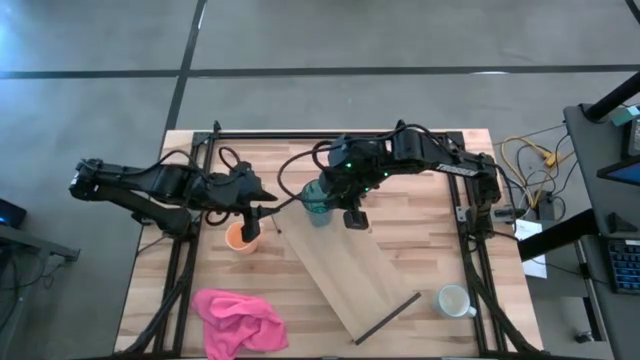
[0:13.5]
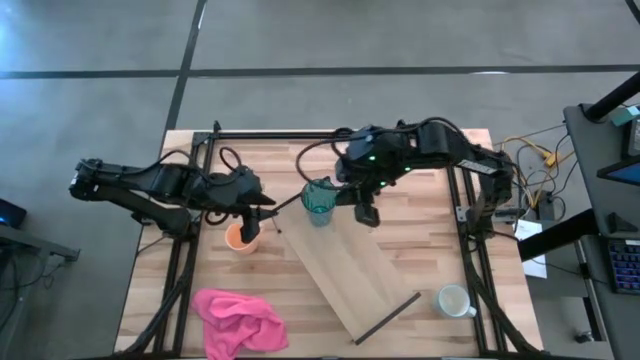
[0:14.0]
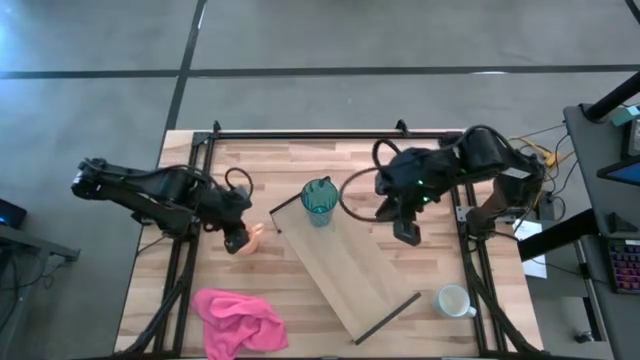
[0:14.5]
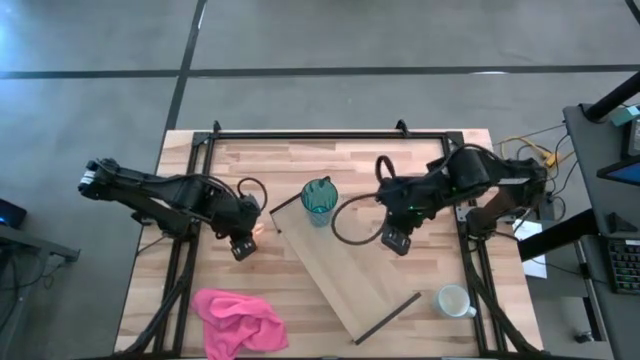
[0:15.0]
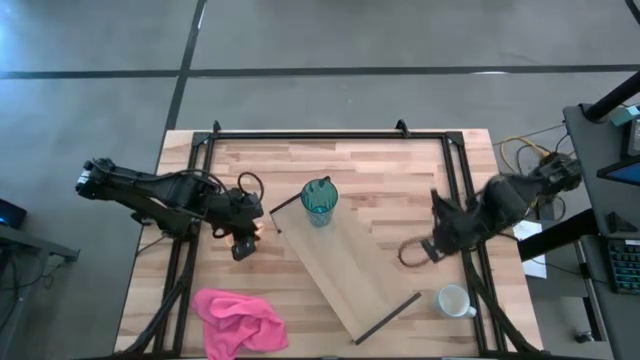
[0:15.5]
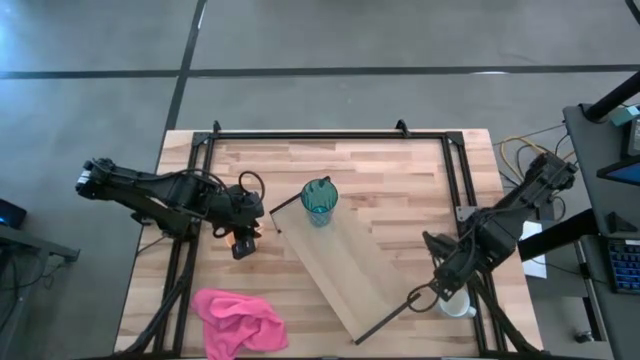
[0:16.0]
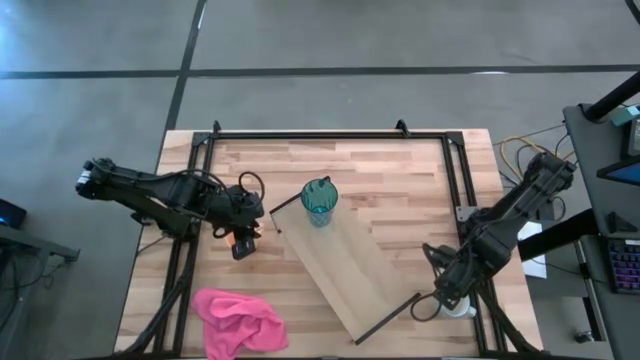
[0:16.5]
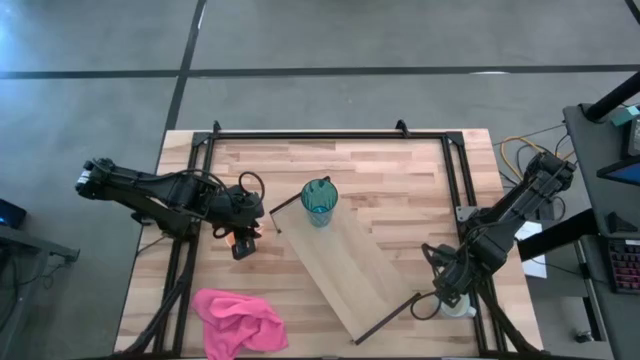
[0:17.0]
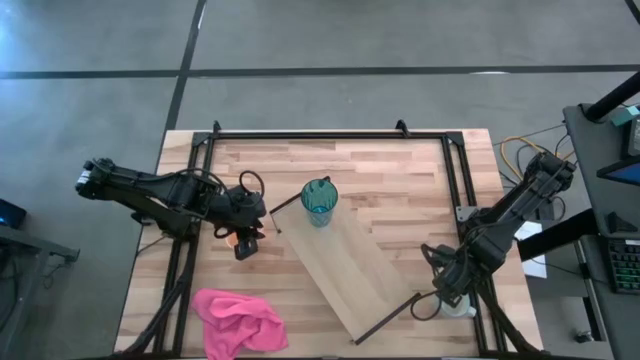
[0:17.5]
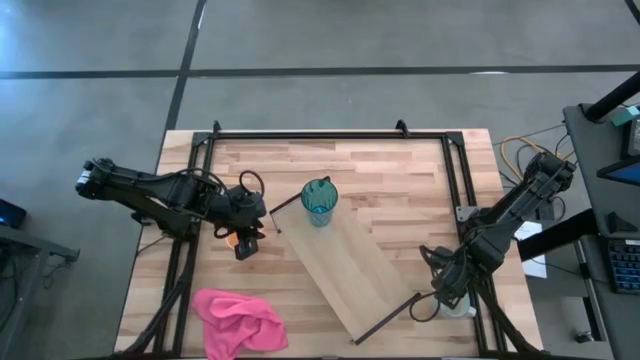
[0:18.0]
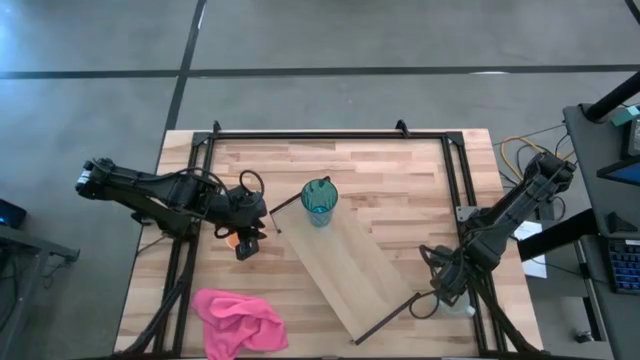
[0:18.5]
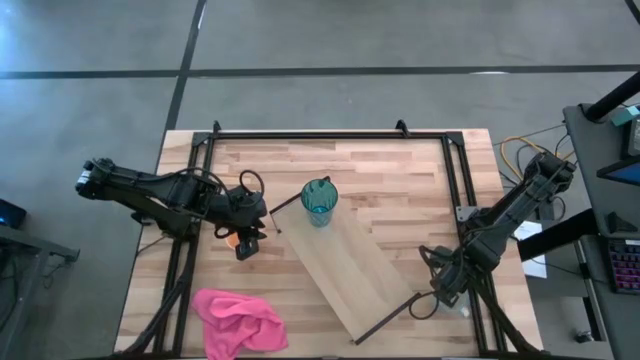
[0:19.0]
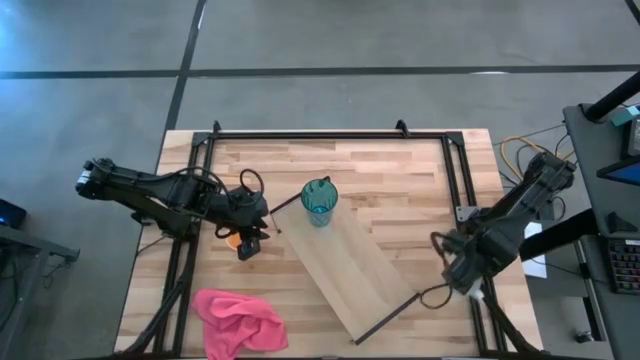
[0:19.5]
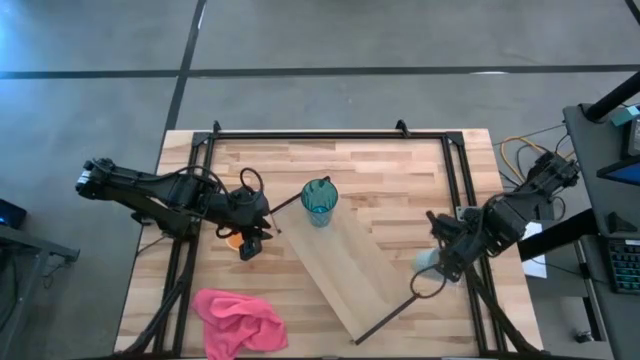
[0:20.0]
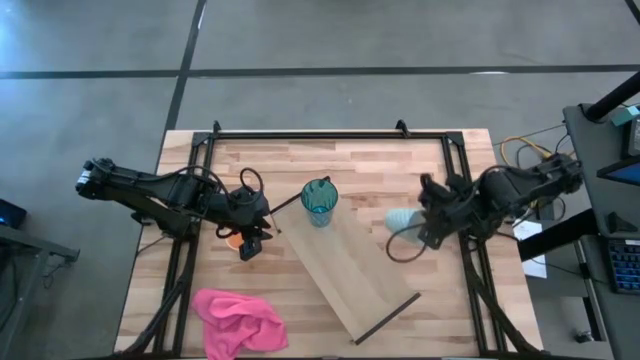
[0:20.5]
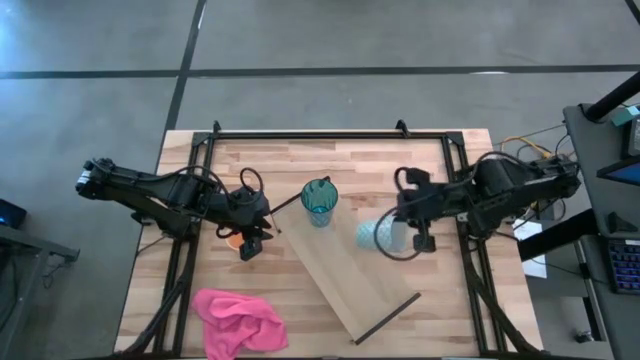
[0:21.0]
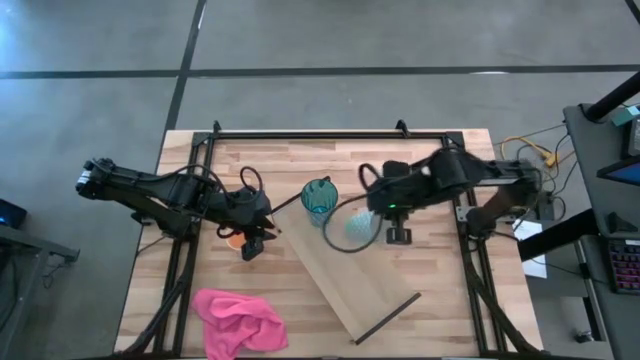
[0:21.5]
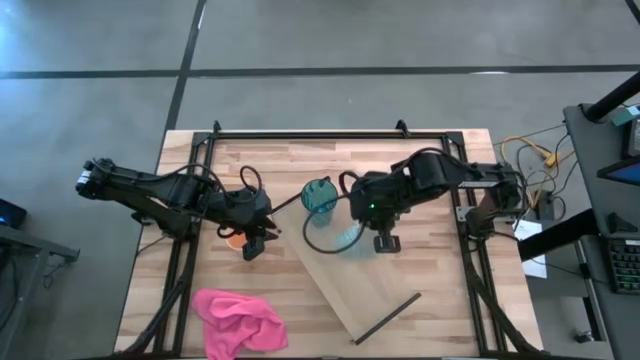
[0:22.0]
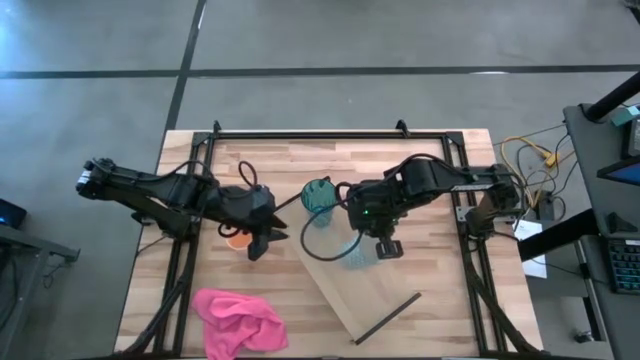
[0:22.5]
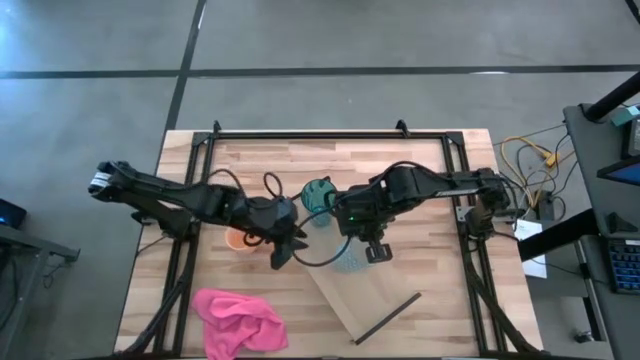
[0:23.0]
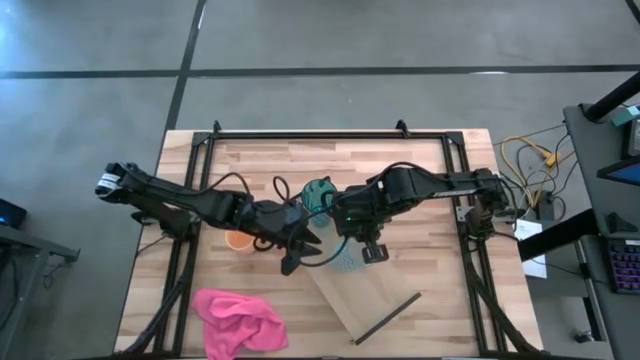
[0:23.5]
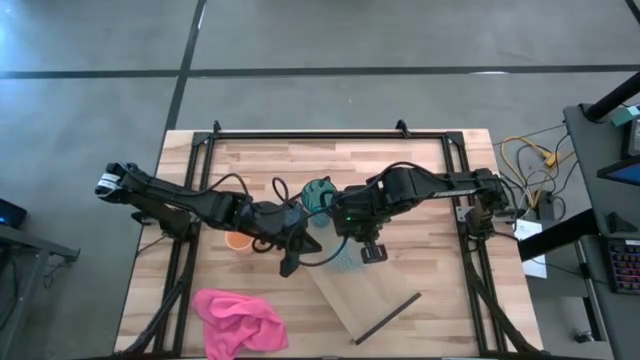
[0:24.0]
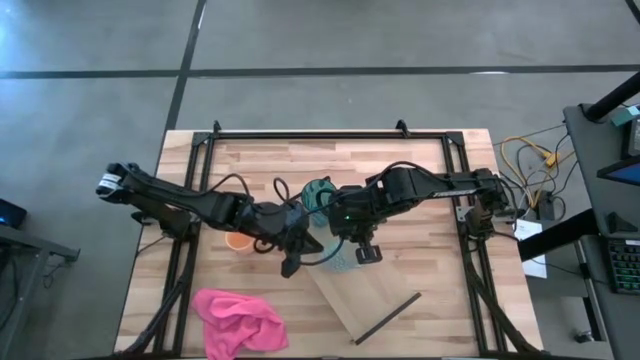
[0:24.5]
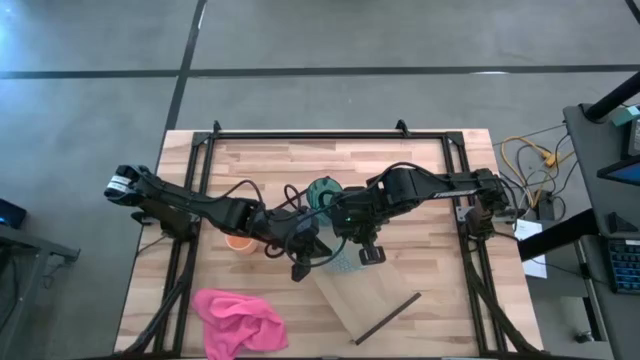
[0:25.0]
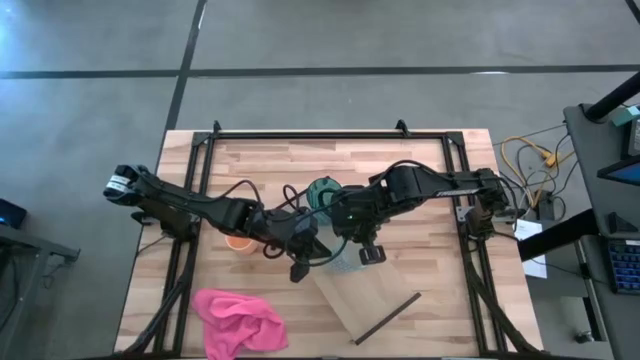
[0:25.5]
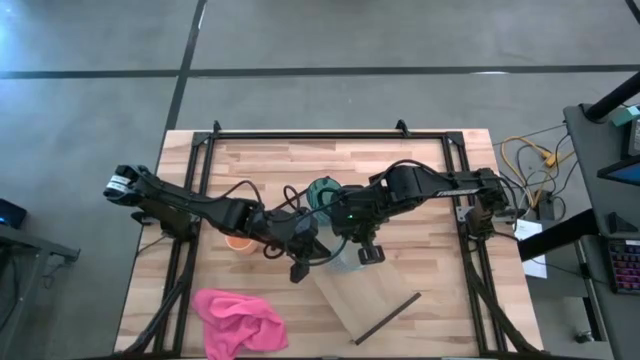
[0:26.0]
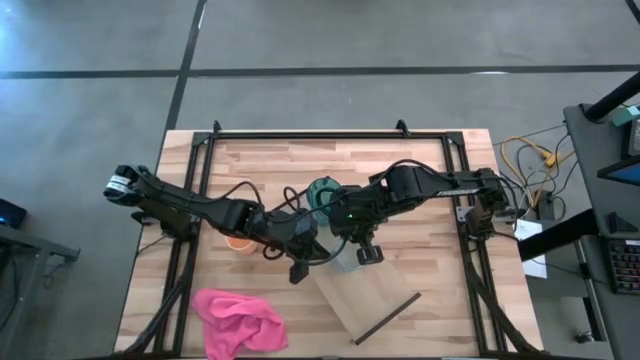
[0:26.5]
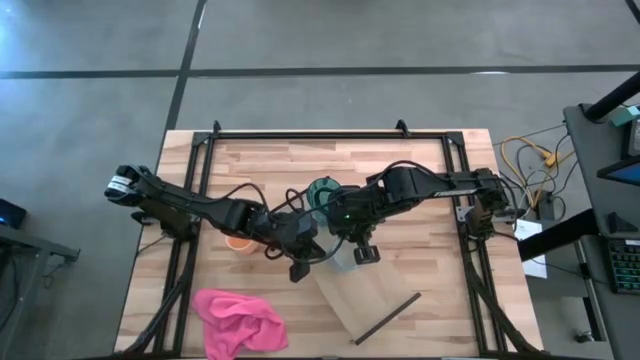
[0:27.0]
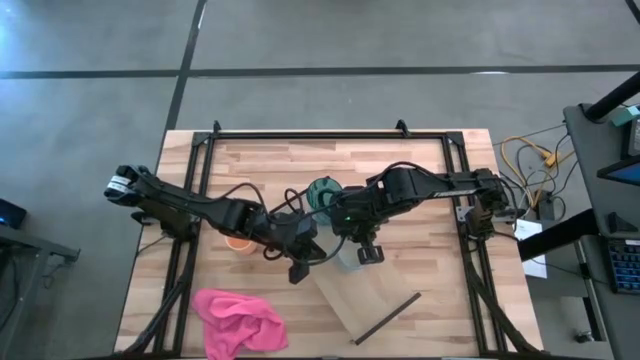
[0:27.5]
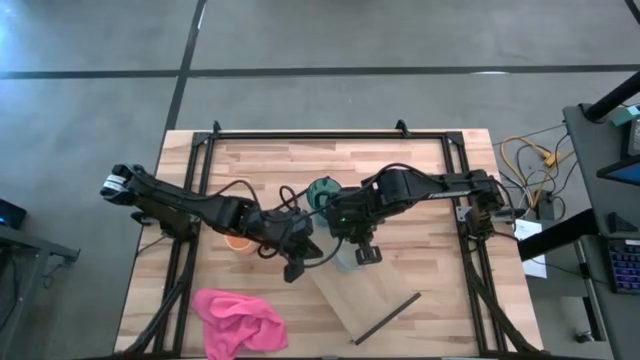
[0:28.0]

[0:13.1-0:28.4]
Task: Stack small to large cups/mugs on shelf
Put the white mug on the shelf

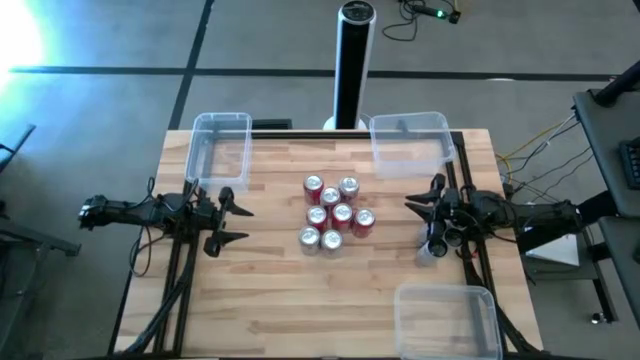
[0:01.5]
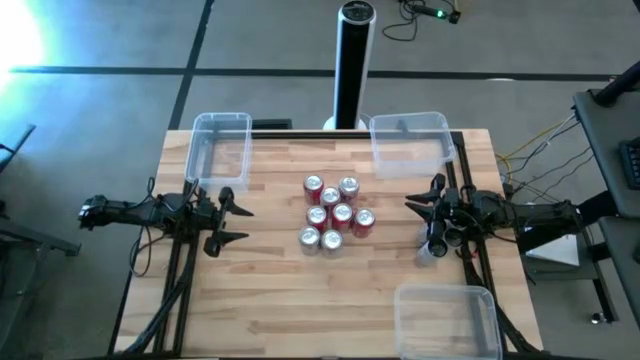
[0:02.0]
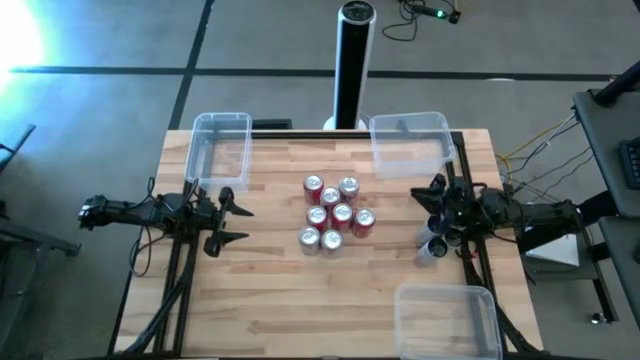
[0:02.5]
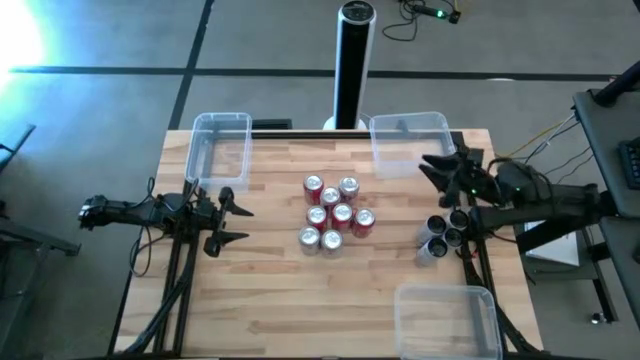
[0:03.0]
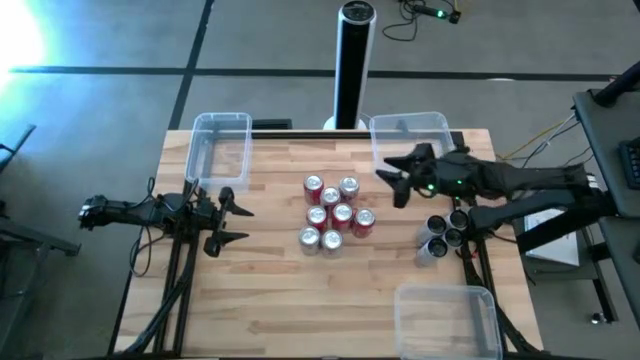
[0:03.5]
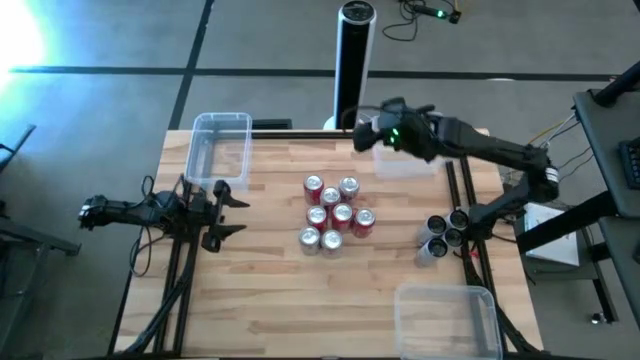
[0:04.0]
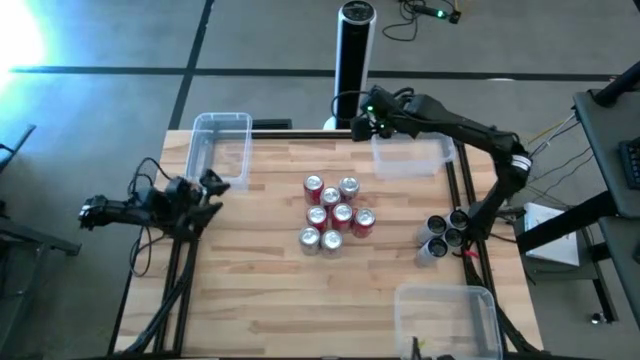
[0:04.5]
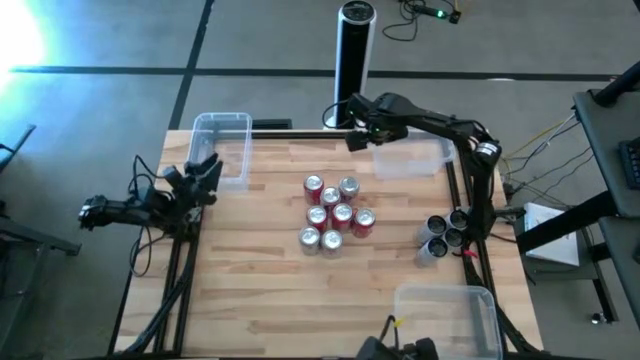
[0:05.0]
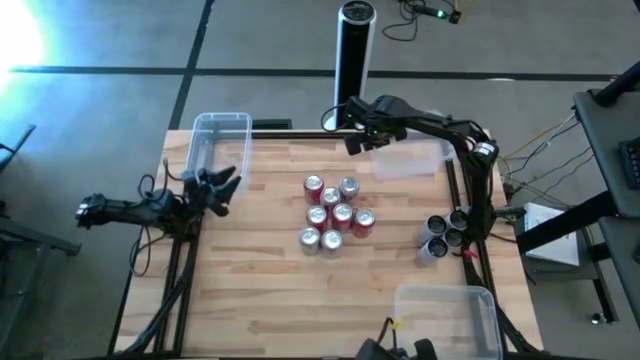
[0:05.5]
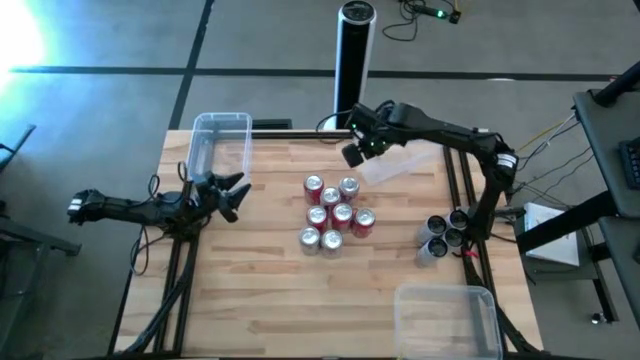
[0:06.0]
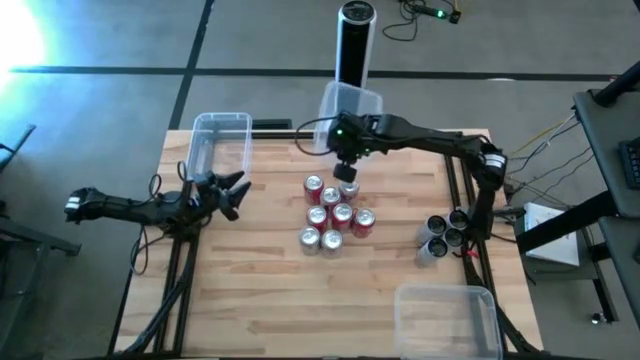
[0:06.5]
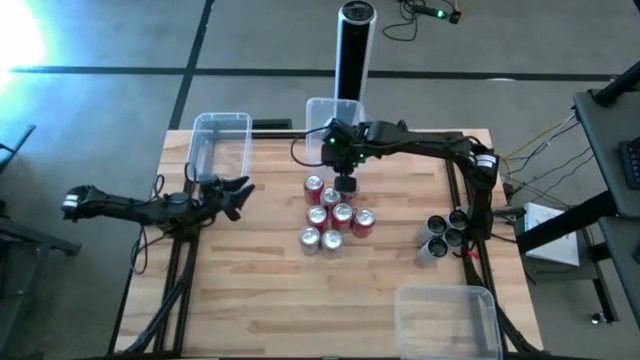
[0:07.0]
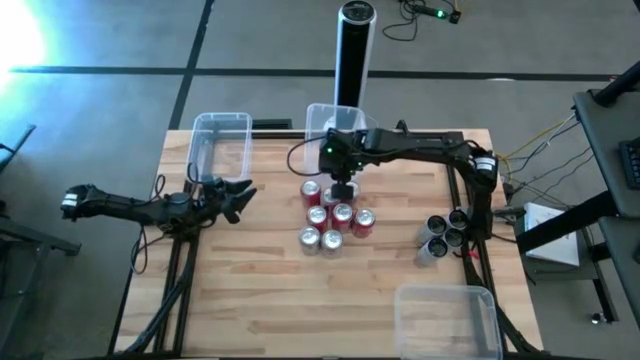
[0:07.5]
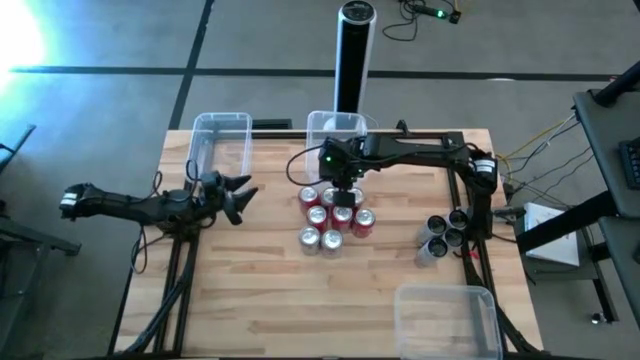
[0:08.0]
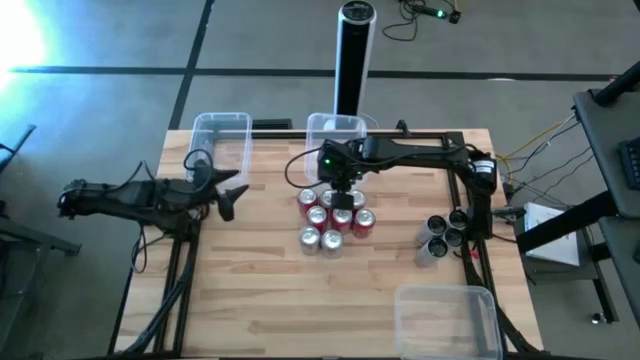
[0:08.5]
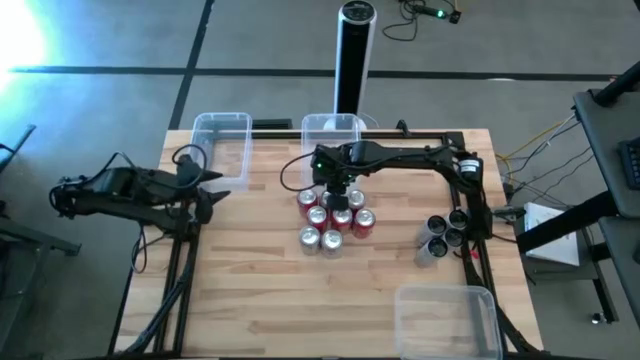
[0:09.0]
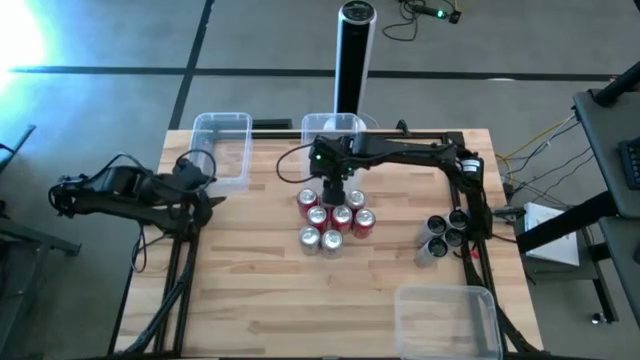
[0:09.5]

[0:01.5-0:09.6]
Task: Sort soda cans
Move the transparent bin to the top center of the table
